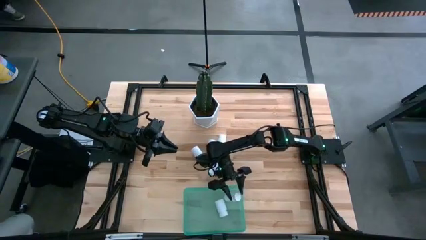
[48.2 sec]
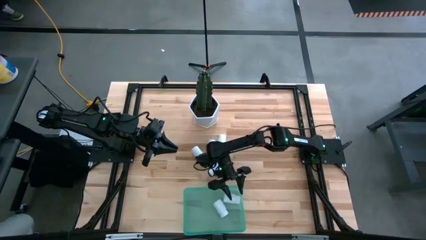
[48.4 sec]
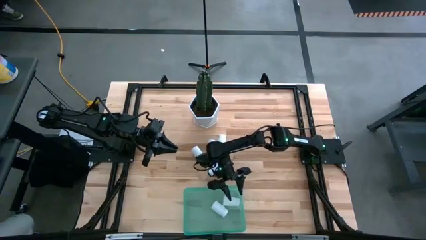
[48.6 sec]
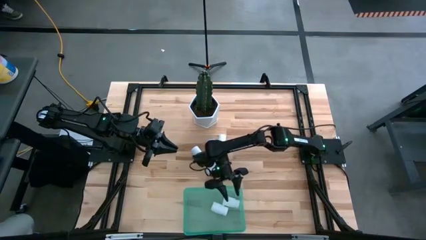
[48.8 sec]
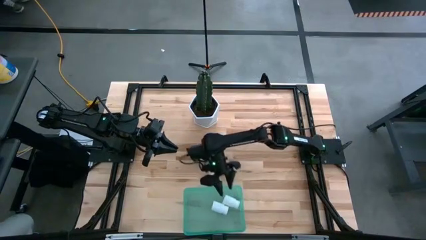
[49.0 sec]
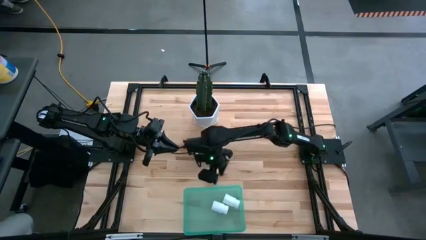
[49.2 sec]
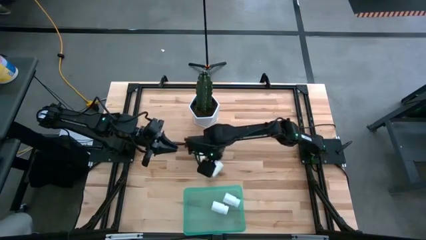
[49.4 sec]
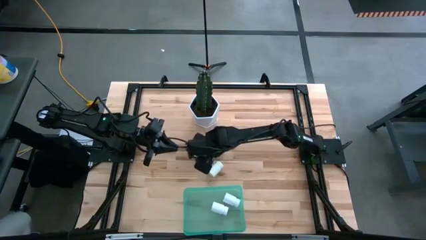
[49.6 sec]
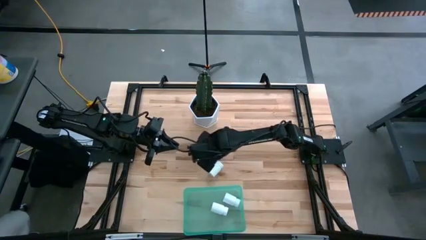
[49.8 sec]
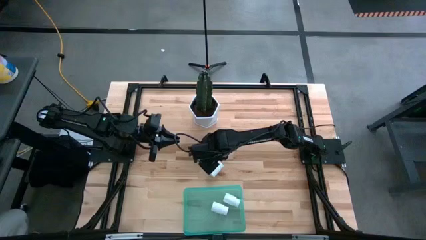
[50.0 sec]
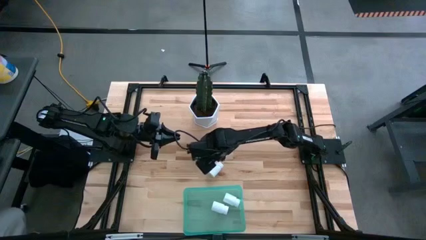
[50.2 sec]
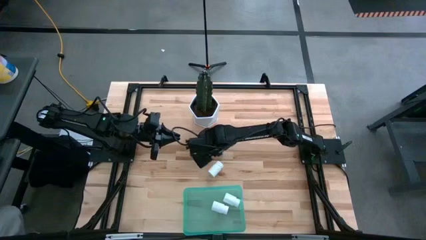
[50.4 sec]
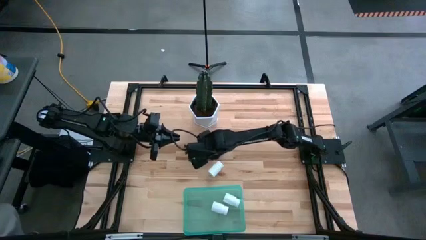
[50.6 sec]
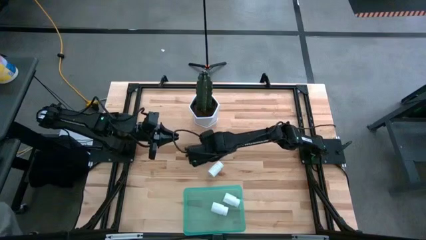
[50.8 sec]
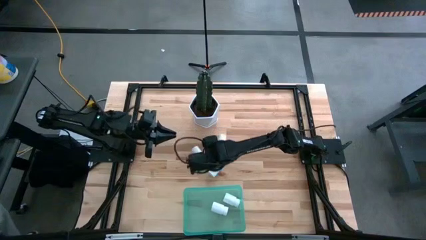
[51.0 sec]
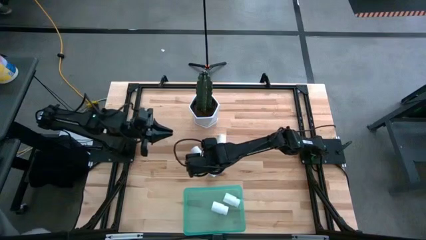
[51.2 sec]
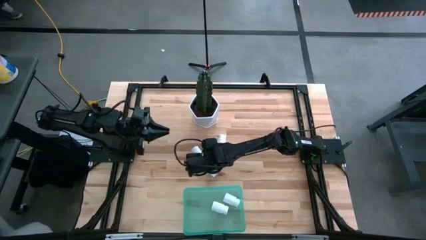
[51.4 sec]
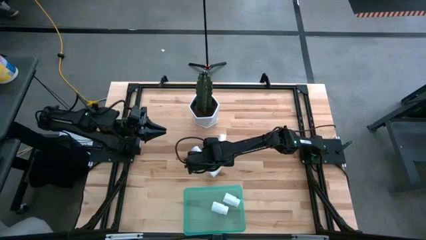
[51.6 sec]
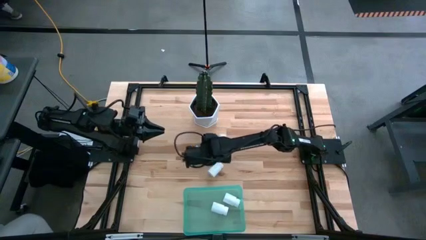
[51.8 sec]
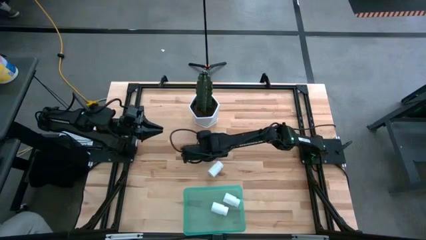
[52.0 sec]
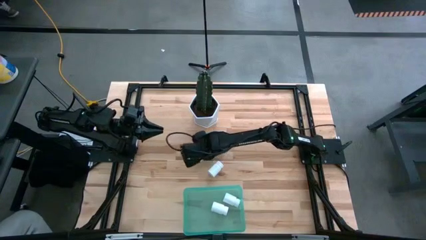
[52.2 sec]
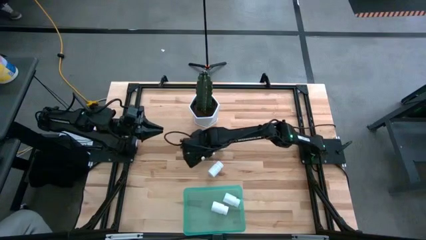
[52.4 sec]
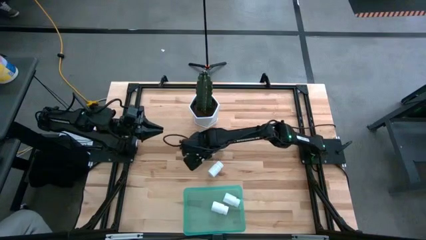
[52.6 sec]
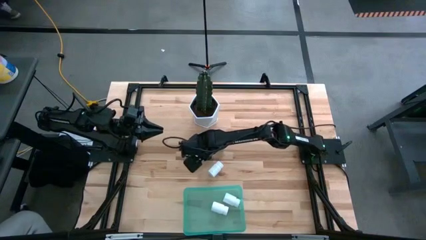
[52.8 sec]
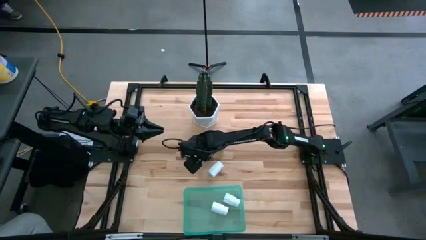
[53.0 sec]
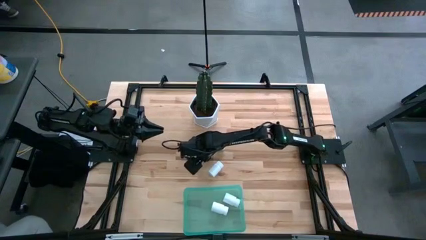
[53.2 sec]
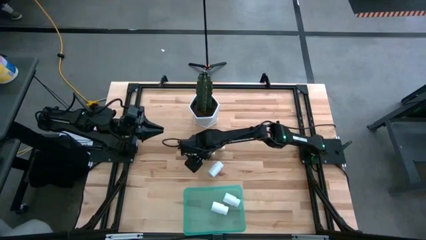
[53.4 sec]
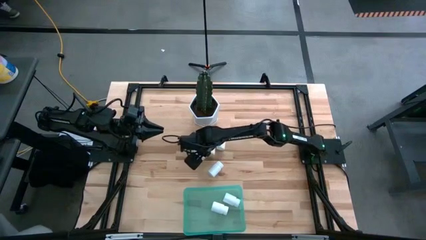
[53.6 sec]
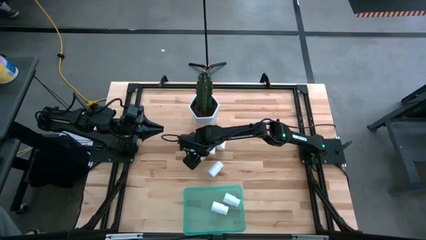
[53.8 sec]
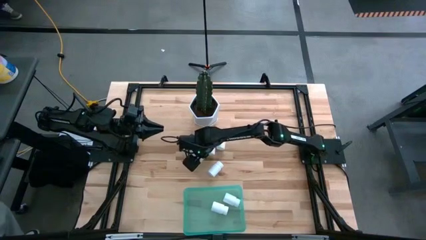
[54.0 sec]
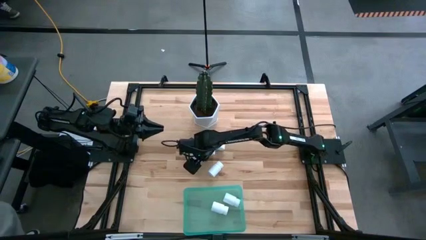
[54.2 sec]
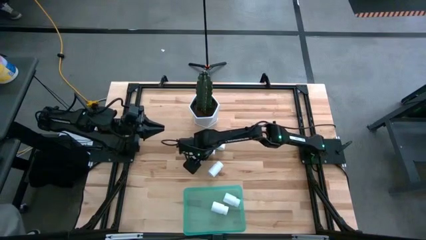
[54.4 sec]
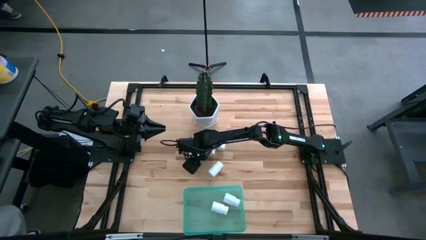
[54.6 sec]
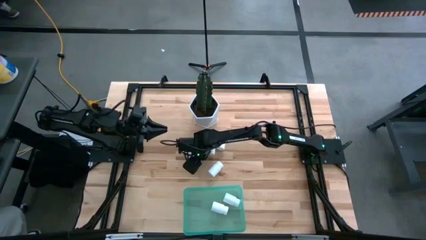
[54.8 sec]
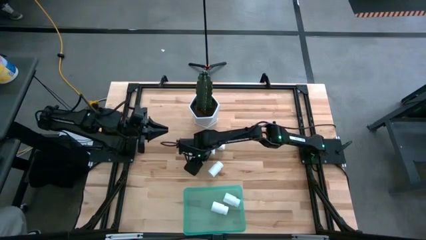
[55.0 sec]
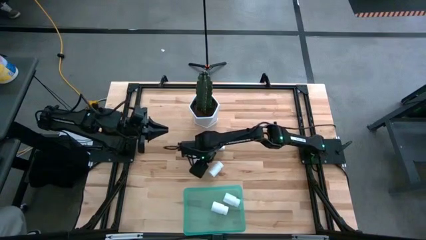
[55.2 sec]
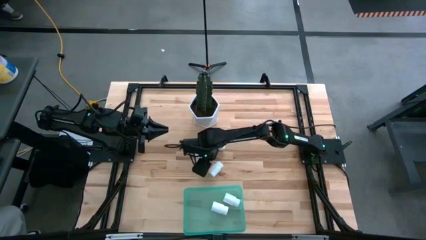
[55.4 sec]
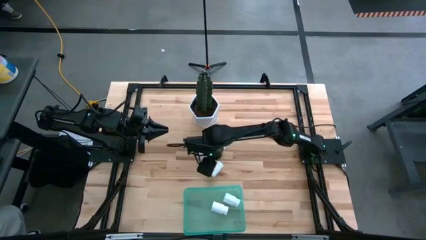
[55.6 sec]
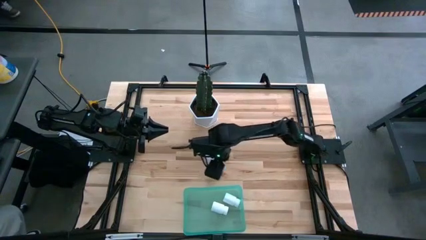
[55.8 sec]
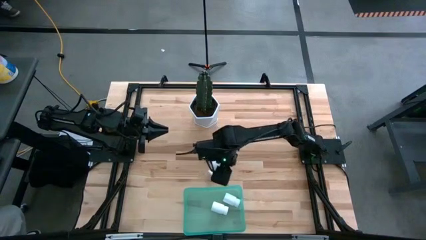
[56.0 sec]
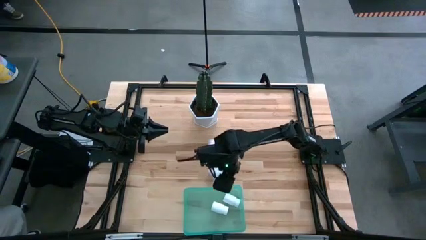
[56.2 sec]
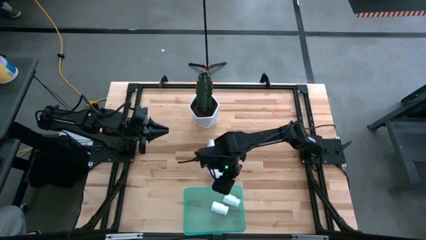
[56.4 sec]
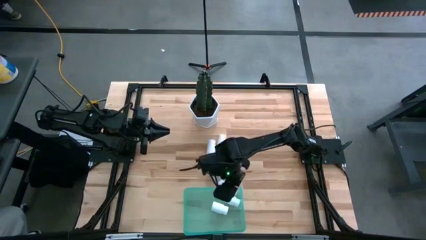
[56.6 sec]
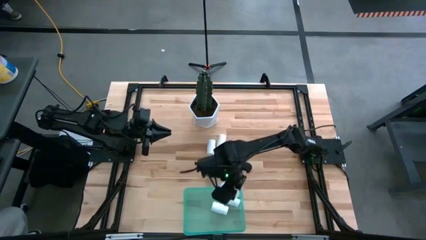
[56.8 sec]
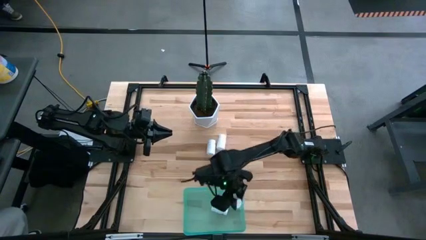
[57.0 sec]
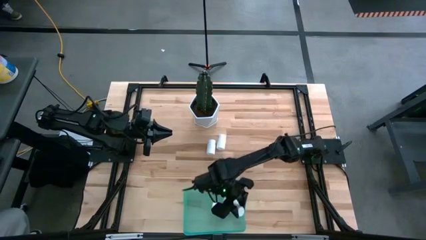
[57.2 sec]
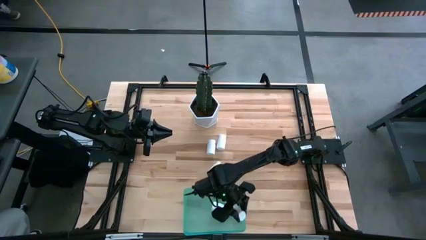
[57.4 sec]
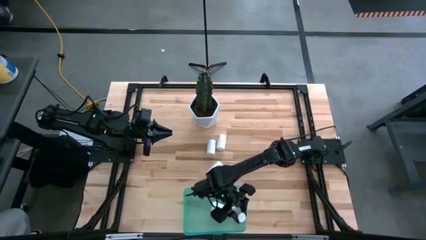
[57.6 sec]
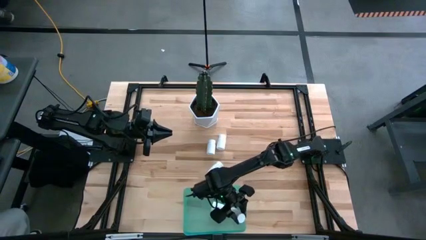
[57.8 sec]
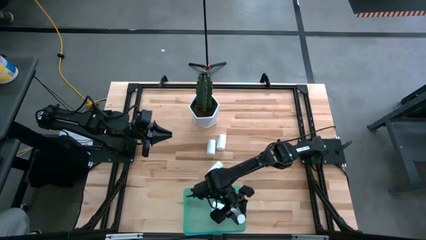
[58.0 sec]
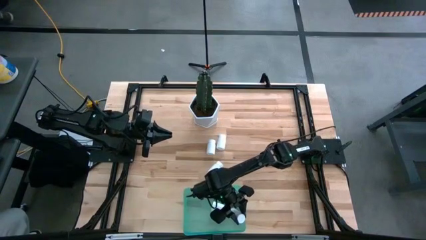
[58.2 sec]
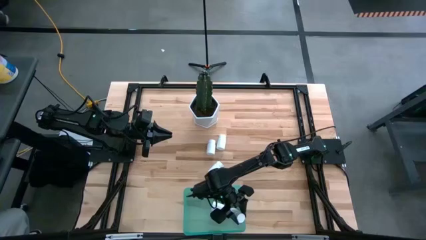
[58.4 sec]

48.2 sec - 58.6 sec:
Task: Pick and place pill bottles into a basket
Put the white pill bottle into the bin

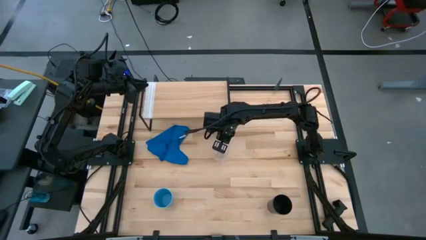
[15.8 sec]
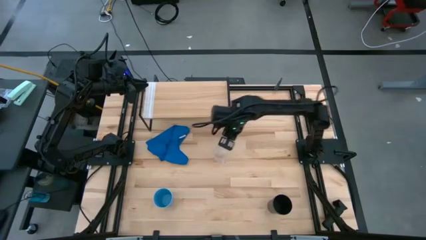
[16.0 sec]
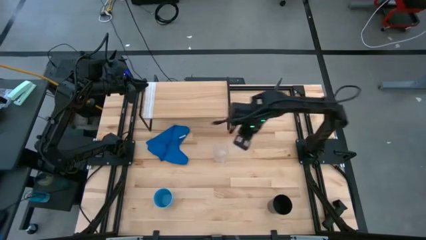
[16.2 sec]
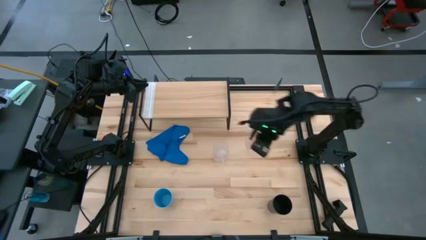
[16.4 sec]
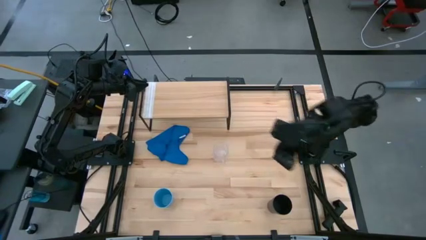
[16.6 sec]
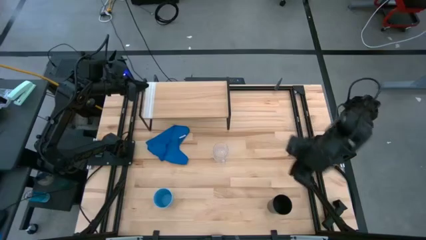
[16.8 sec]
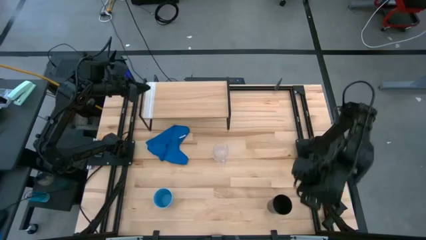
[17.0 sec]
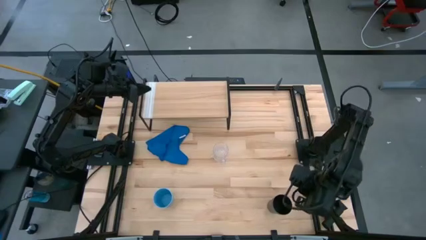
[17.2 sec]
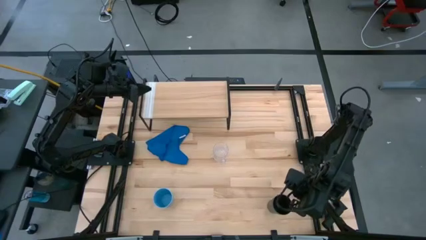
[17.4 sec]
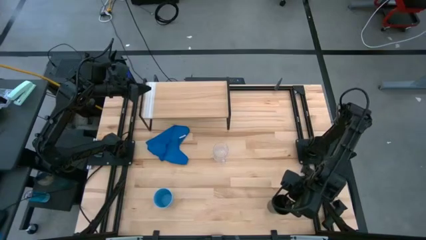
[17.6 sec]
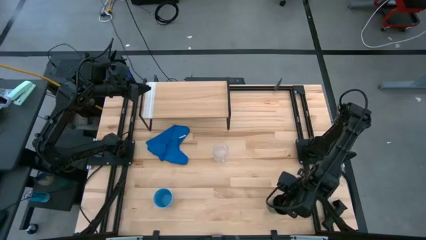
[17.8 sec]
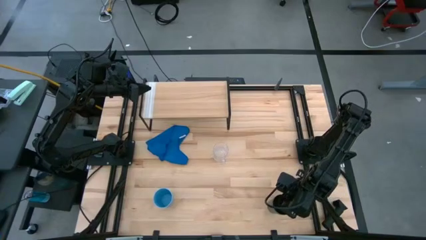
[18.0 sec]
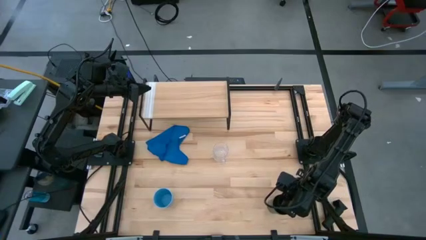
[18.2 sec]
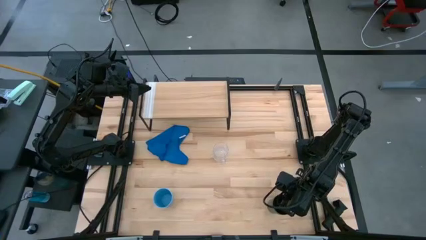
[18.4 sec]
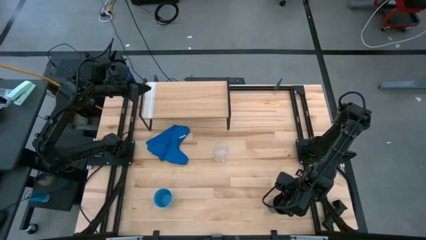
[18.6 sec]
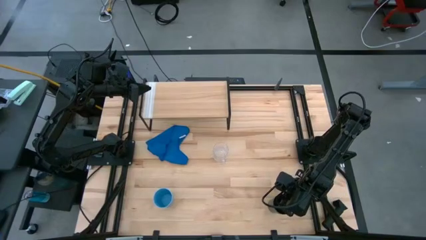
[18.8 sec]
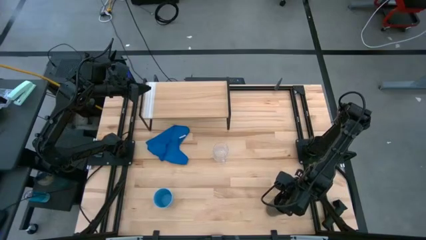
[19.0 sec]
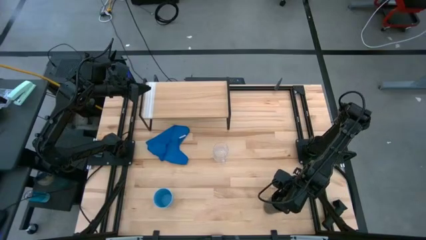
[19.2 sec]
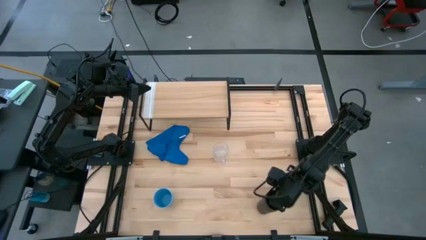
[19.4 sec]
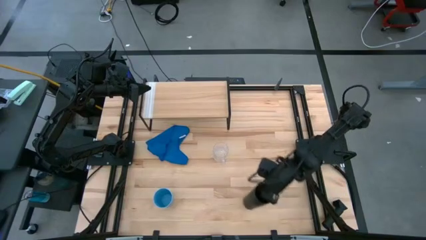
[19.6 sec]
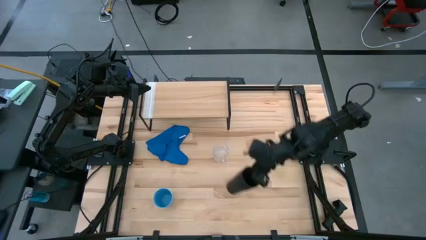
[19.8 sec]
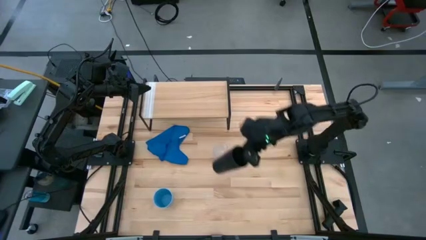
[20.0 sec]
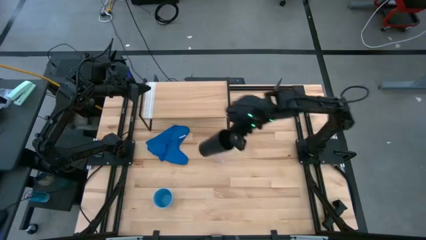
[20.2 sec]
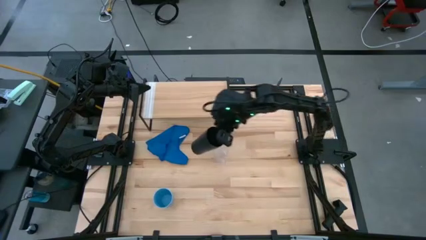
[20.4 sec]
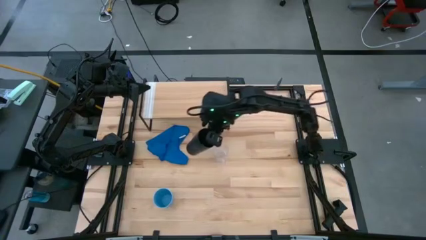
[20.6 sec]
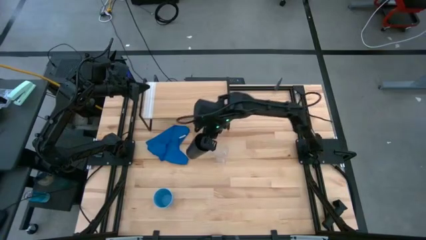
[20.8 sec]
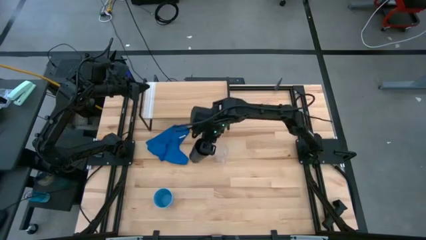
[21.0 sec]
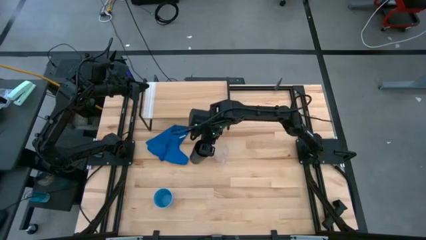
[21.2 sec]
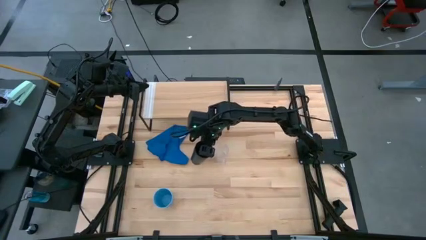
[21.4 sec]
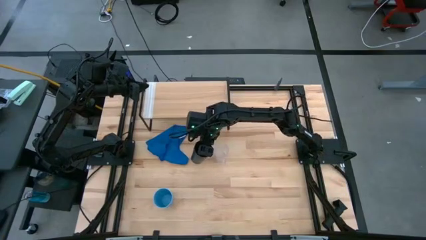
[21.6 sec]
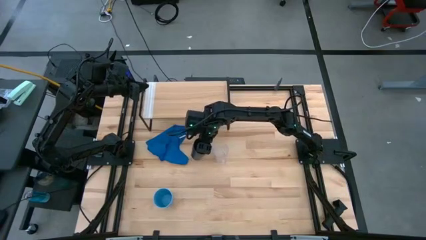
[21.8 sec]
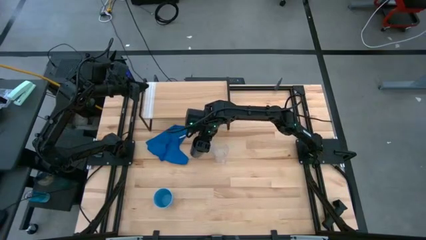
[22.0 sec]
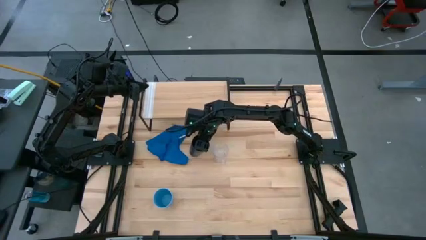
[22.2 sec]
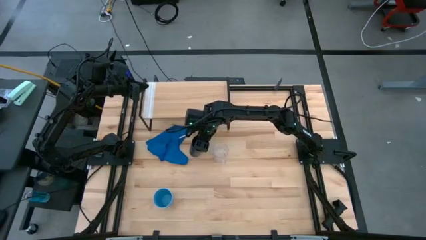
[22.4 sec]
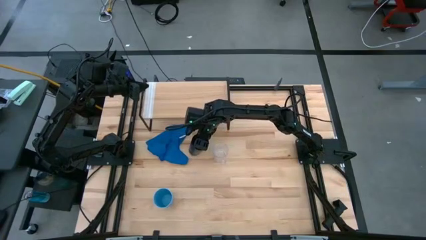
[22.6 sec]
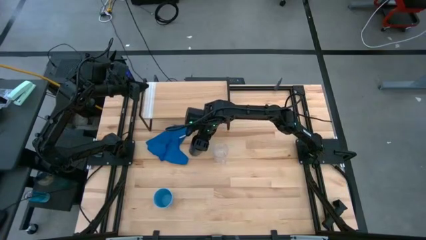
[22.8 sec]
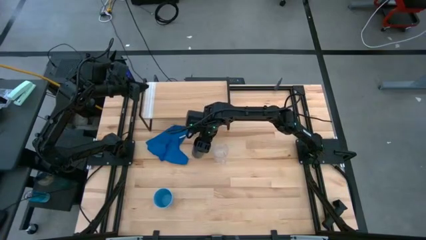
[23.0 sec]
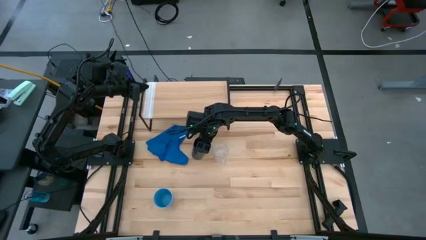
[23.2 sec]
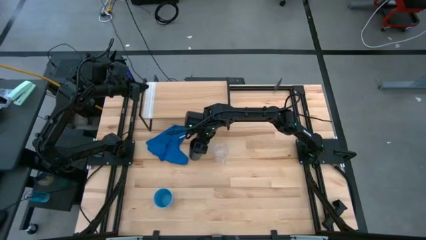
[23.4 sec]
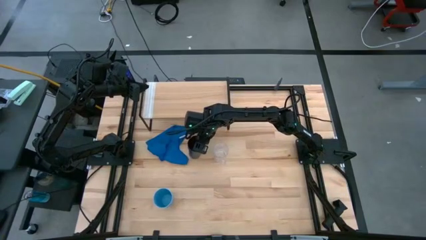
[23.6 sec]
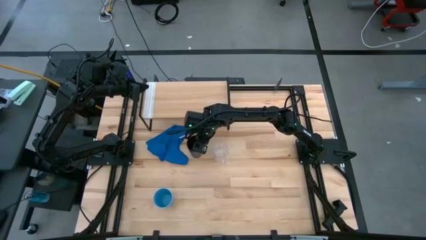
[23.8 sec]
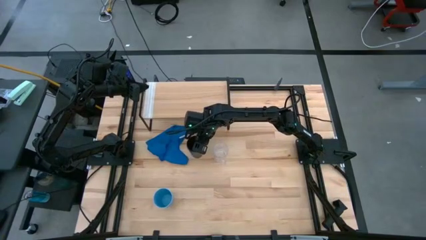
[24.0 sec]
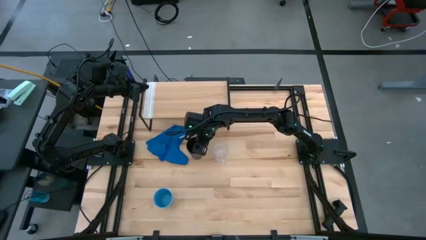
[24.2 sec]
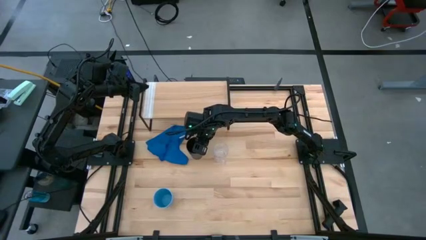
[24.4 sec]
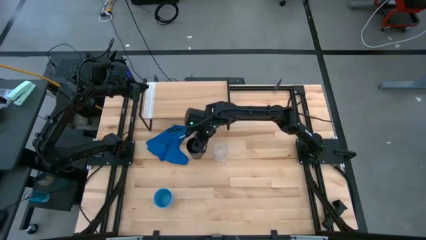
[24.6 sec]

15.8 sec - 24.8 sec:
Task: Stack small to large cups/mugs on shelf
Move the black cup to the center of the table
